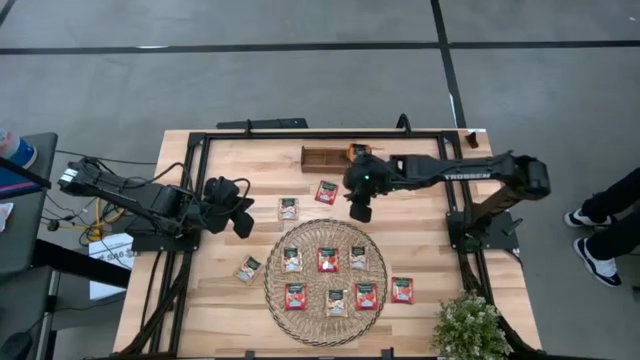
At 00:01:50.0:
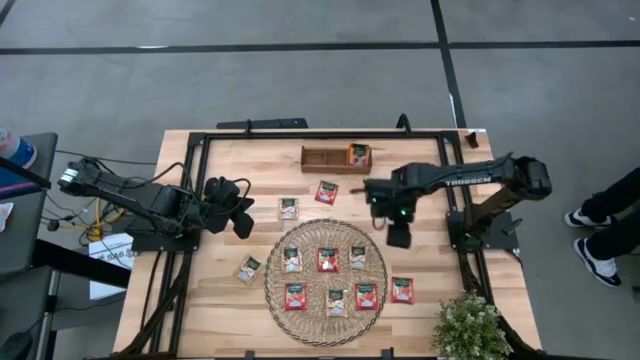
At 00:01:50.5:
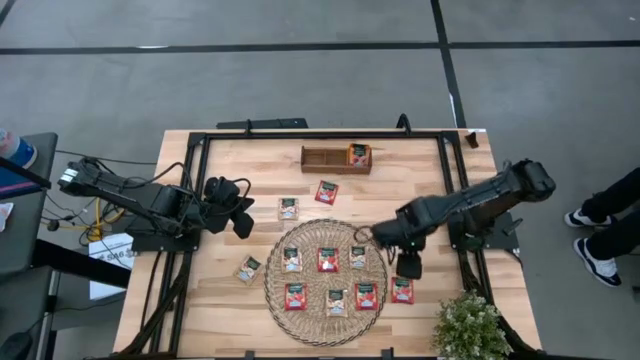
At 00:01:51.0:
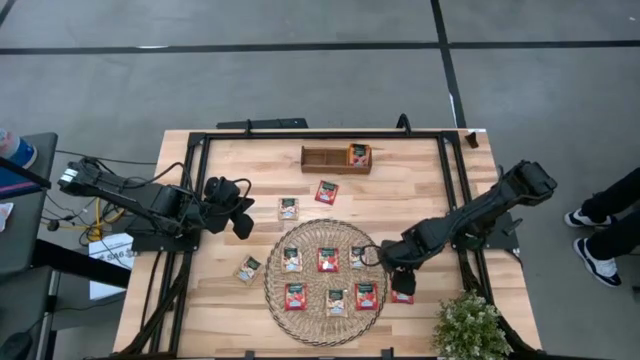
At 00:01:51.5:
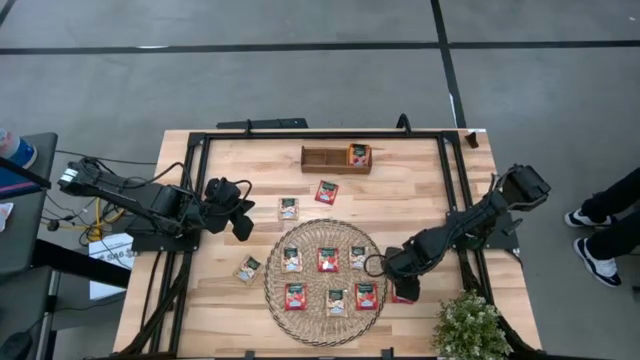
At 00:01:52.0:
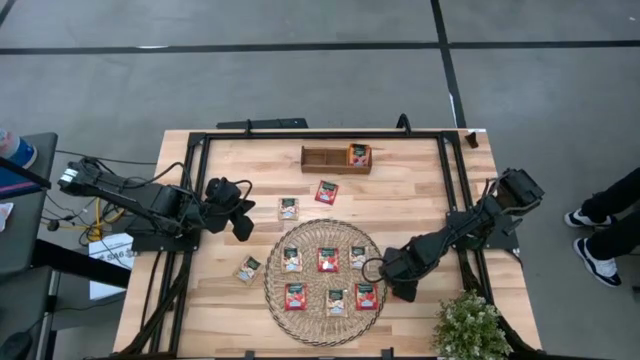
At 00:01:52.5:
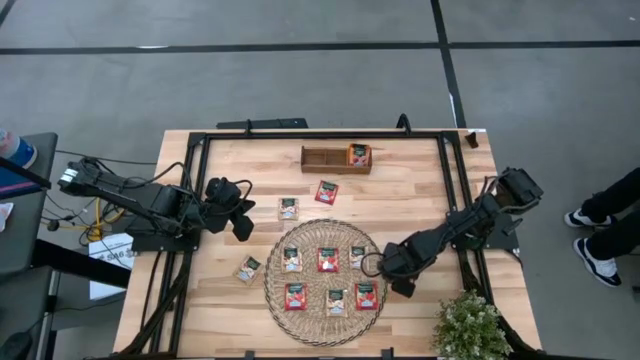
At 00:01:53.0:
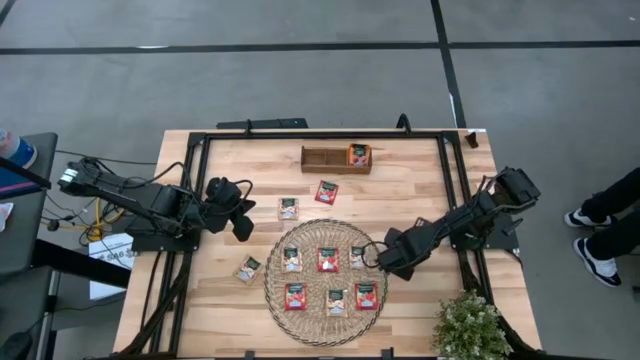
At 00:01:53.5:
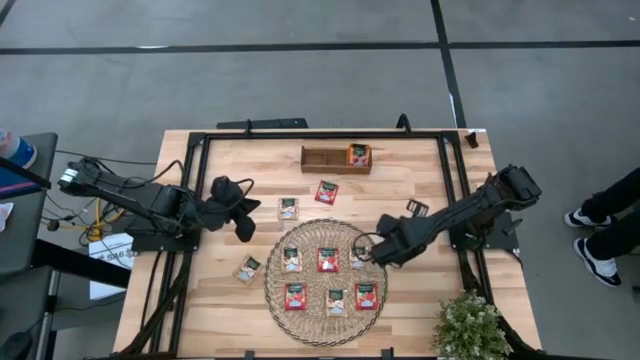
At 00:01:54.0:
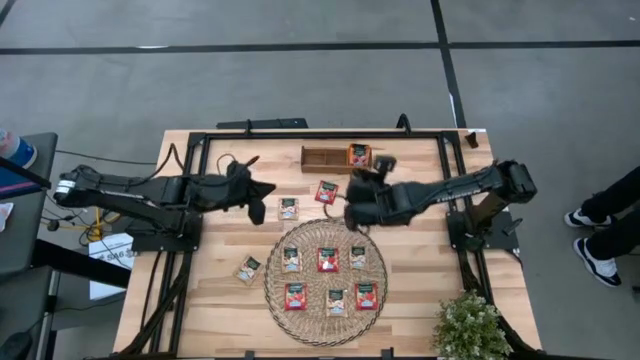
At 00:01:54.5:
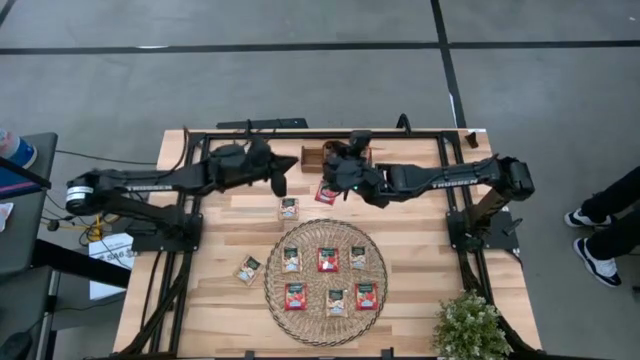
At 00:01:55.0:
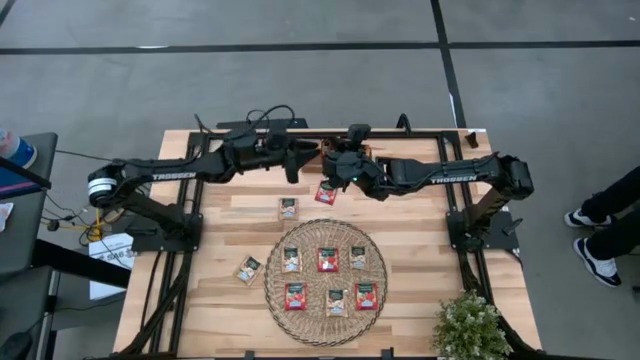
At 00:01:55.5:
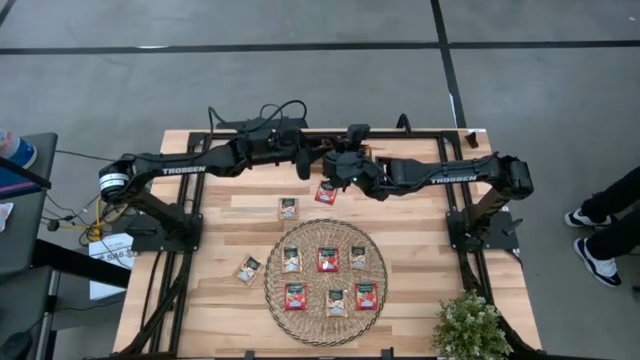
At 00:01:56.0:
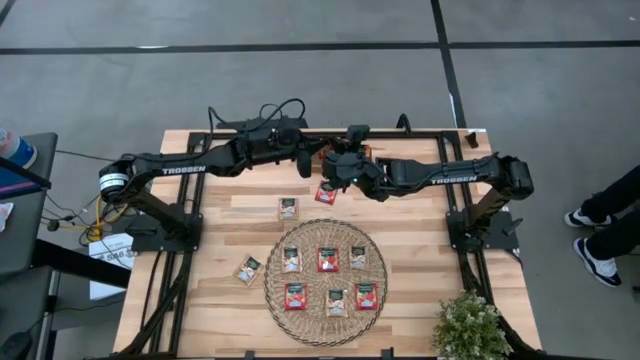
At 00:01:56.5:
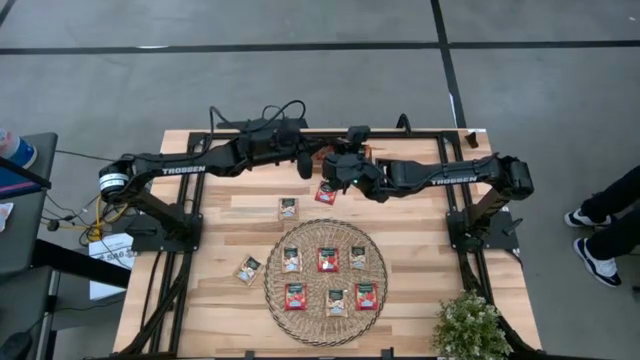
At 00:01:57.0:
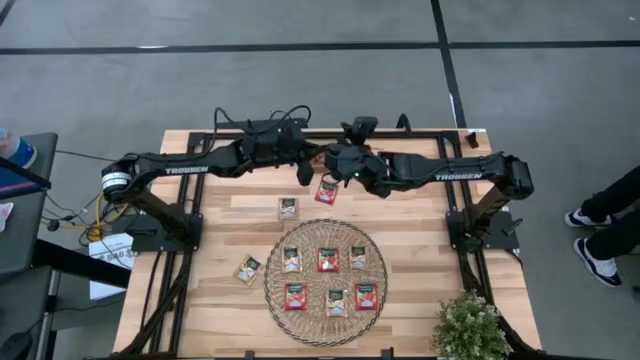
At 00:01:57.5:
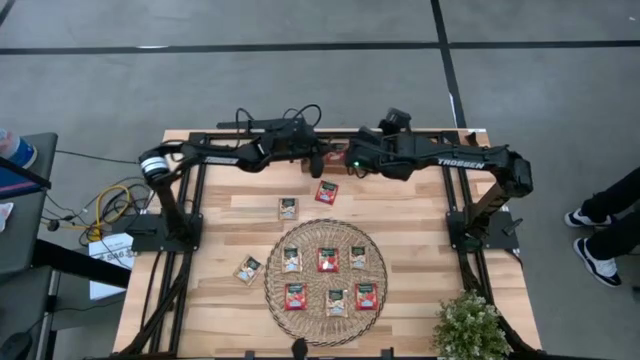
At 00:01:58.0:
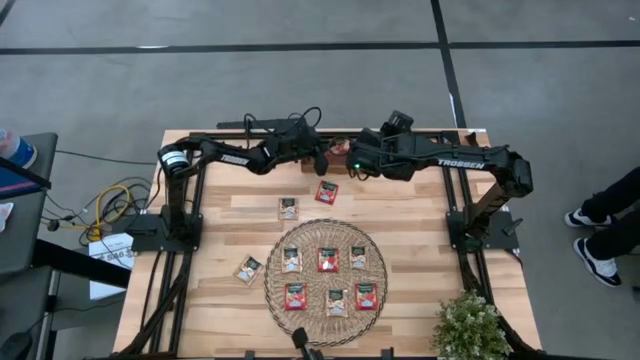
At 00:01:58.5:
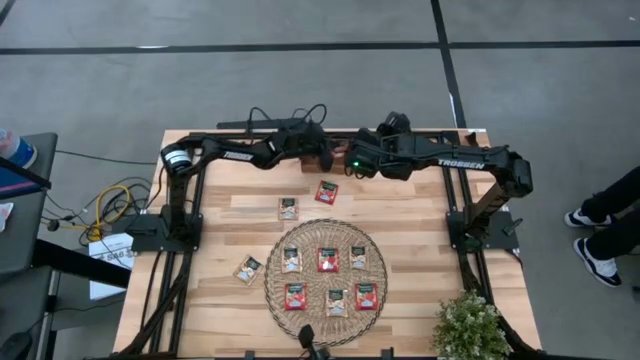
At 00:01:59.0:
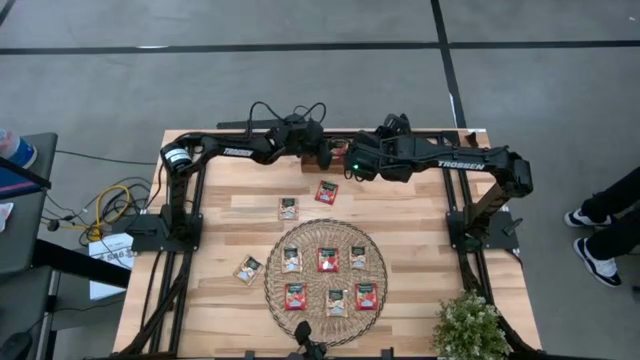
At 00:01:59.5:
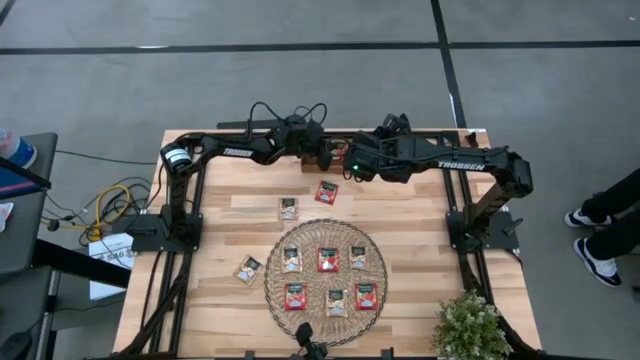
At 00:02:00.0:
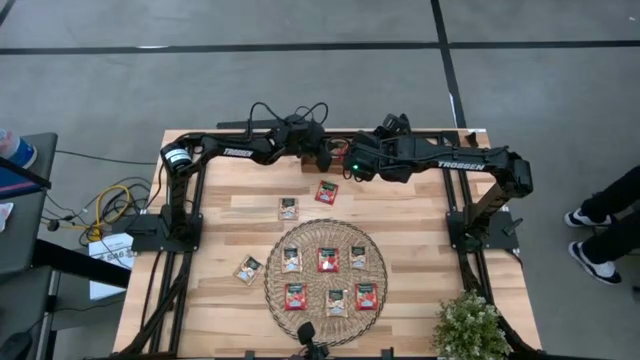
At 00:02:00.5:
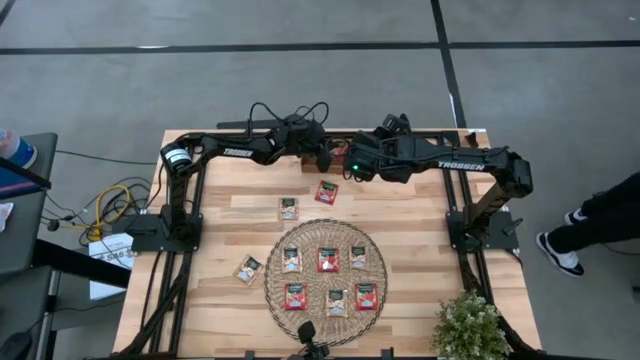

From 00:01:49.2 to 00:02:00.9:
Task: Pick & Place Tea
Put the red tea bag into the middle section of the wooden organizer

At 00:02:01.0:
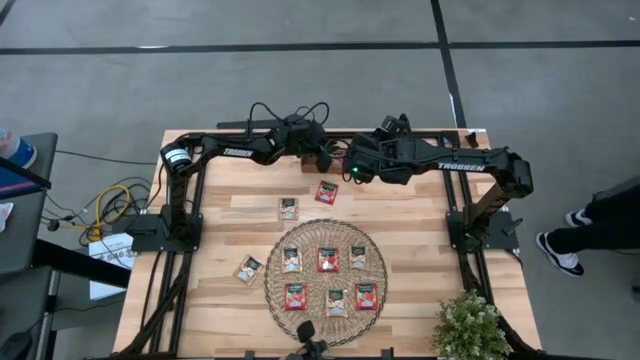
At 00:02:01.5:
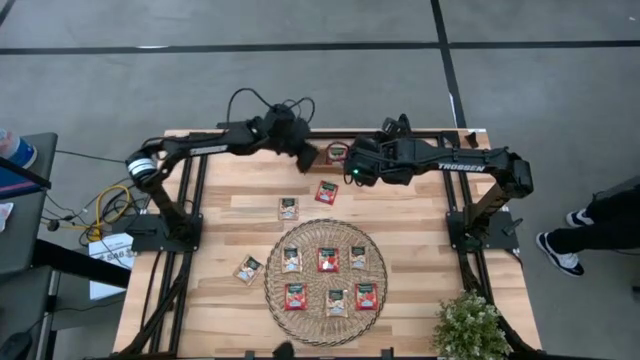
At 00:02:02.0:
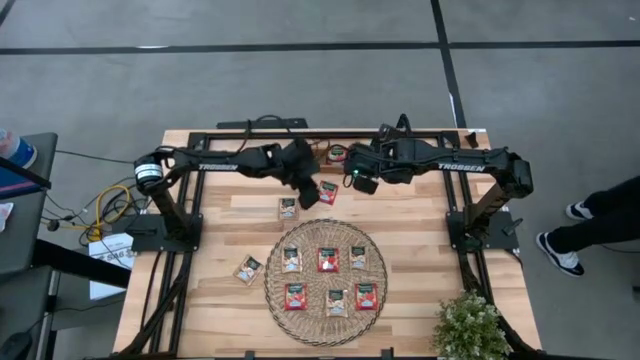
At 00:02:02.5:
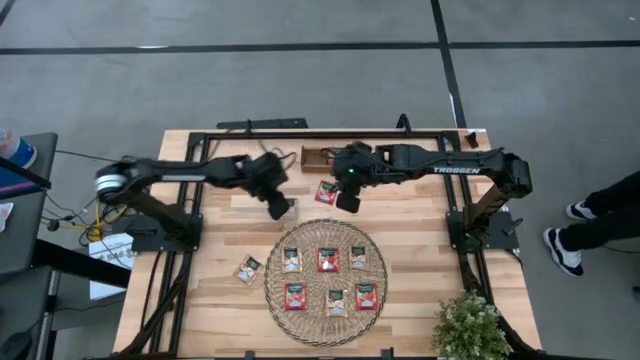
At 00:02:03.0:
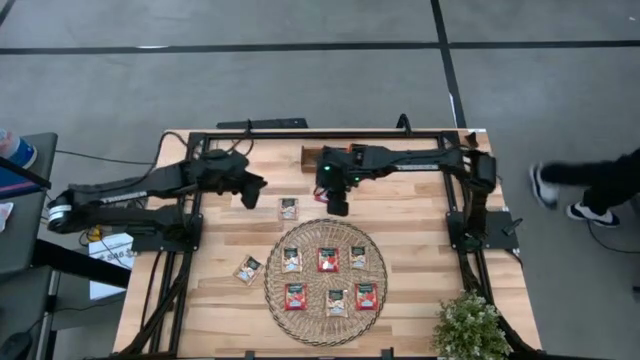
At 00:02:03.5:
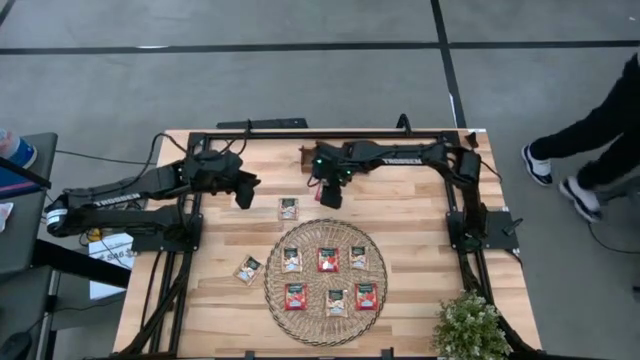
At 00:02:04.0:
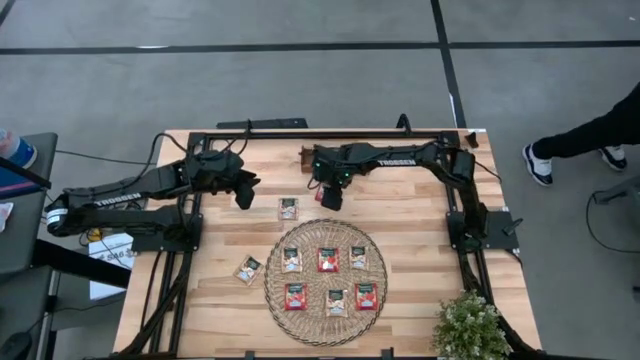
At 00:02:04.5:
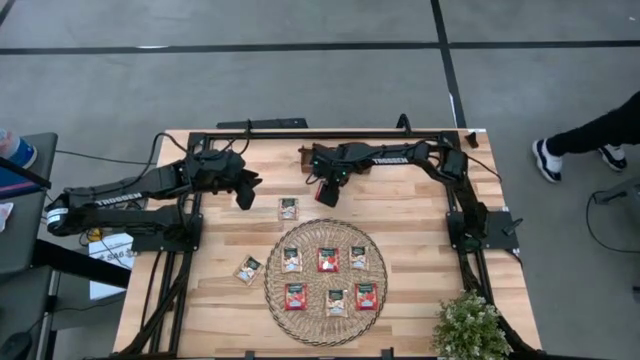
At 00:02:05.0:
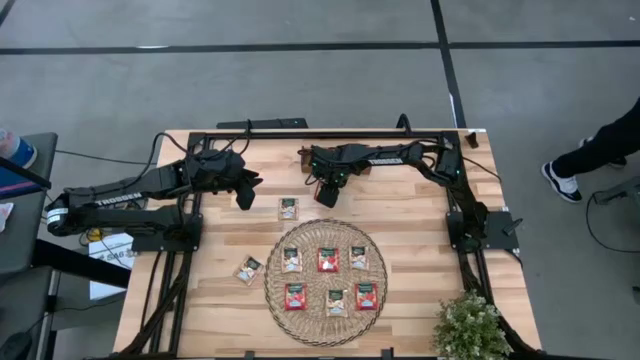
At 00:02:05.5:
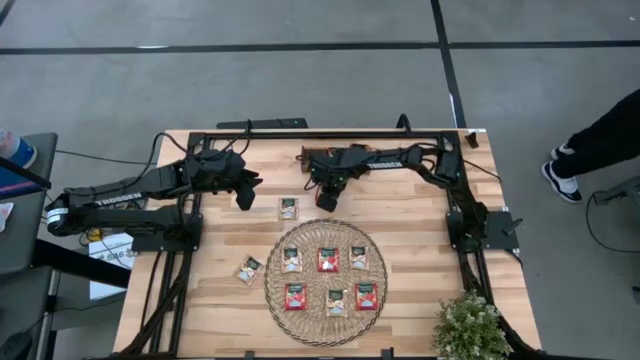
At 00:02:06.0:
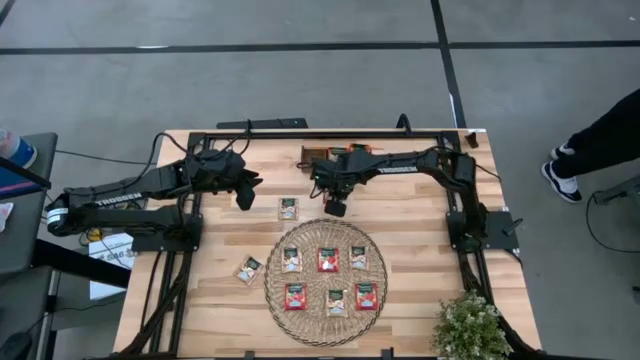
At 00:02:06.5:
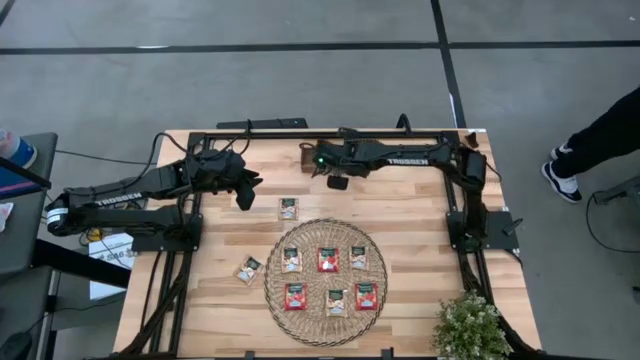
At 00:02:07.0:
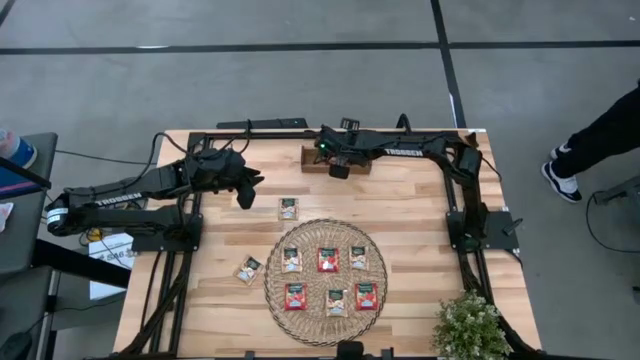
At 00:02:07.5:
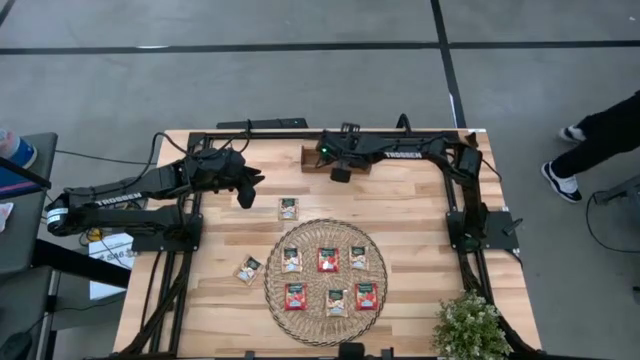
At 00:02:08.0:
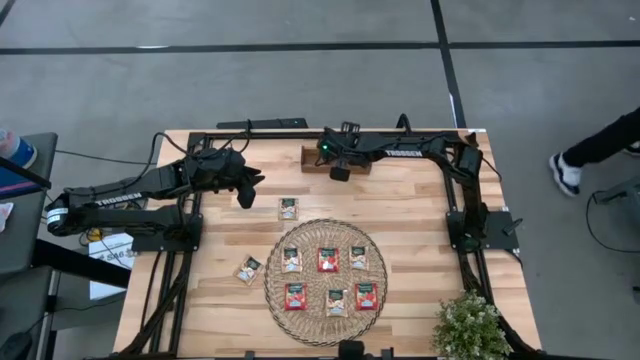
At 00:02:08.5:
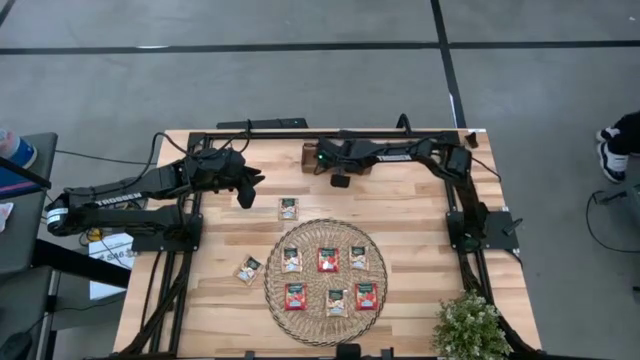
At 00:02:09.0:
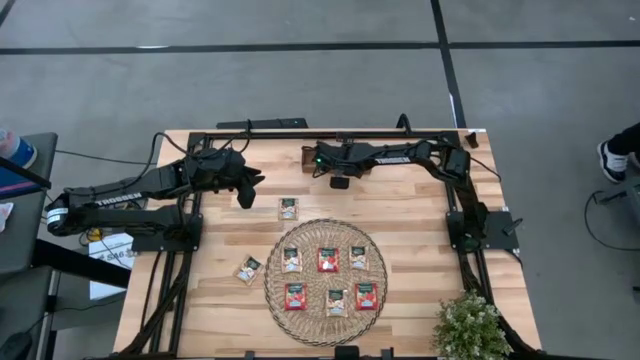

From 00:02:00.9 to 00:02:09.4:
Put the red tea bag into the middle section of the wooden organizer
